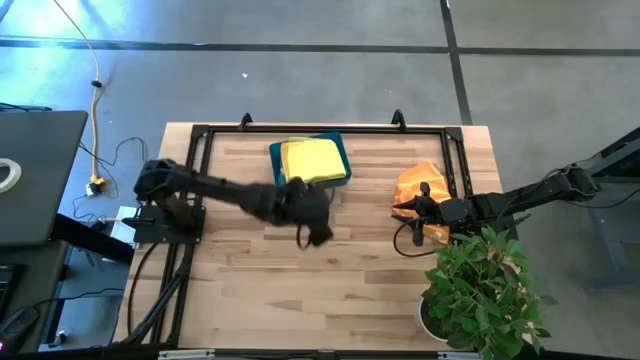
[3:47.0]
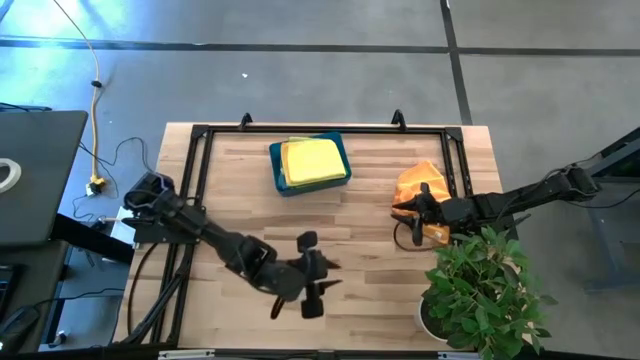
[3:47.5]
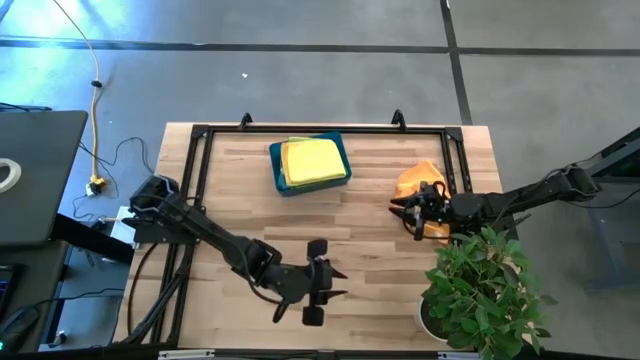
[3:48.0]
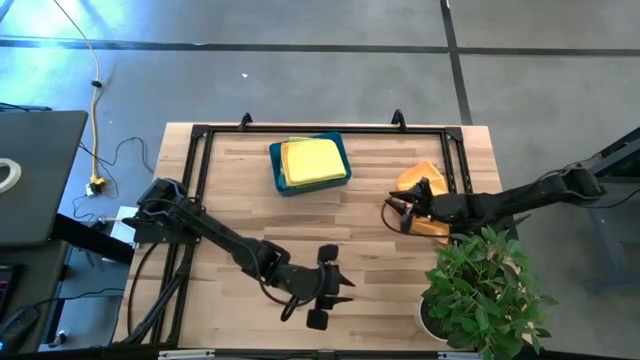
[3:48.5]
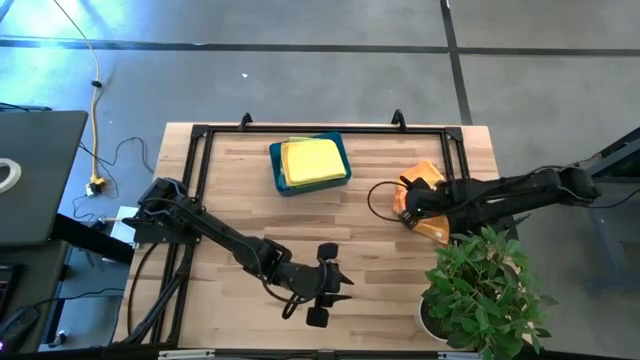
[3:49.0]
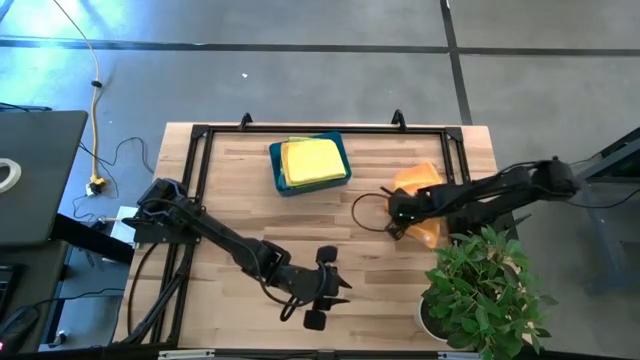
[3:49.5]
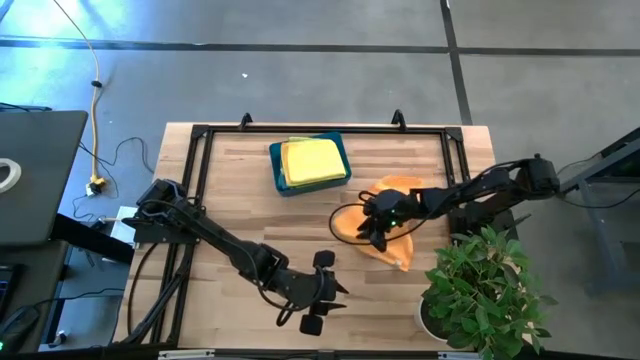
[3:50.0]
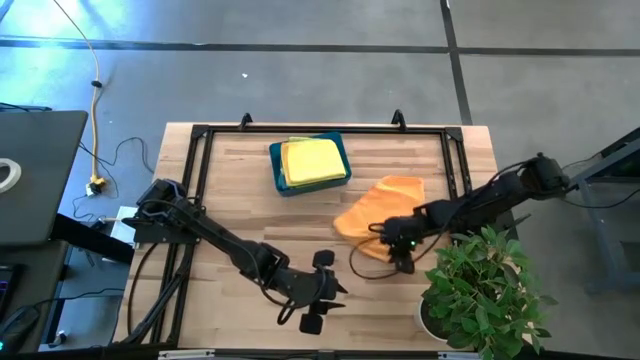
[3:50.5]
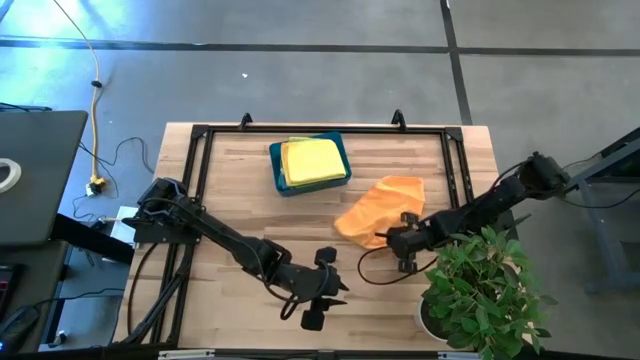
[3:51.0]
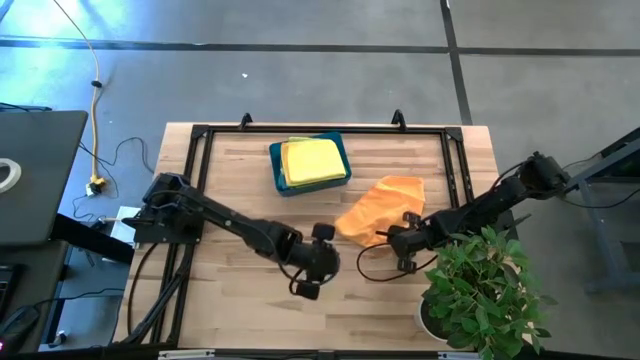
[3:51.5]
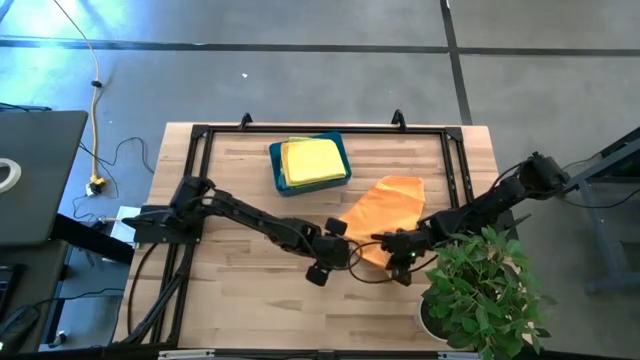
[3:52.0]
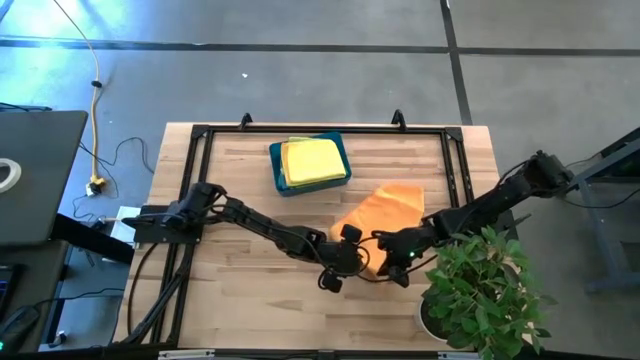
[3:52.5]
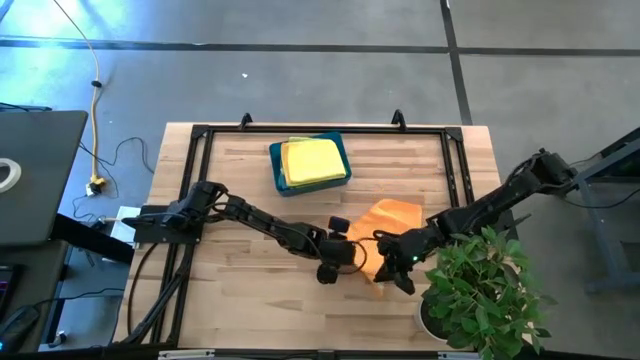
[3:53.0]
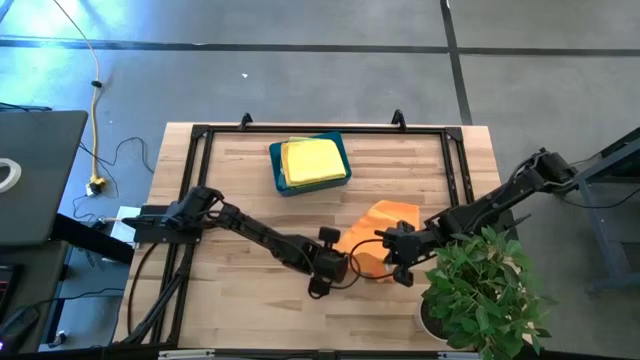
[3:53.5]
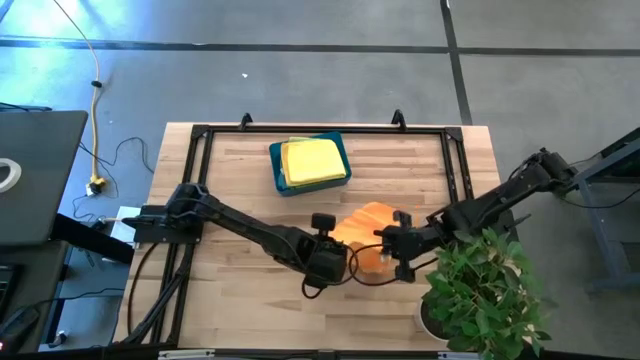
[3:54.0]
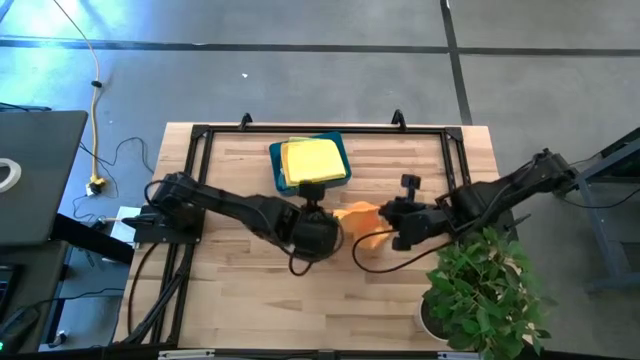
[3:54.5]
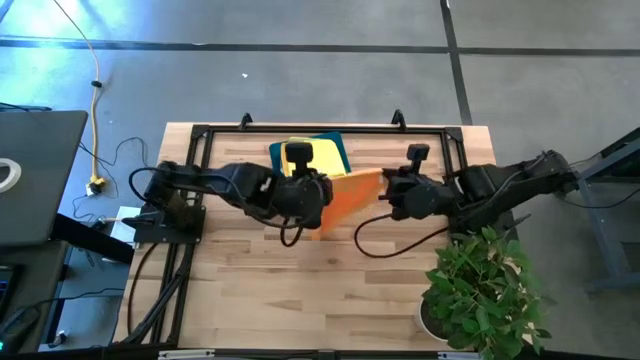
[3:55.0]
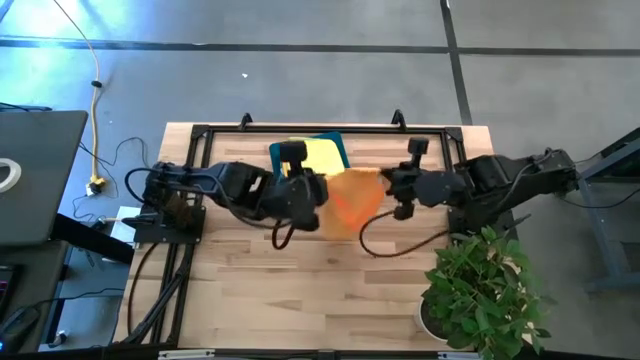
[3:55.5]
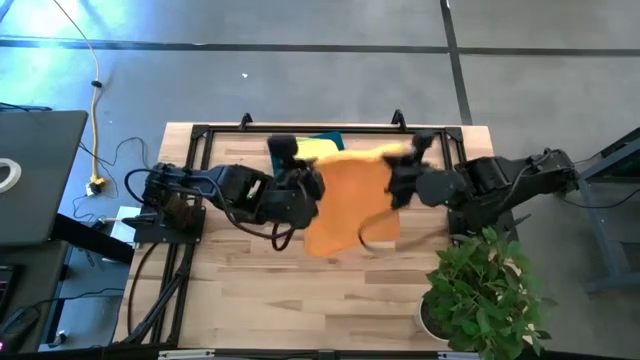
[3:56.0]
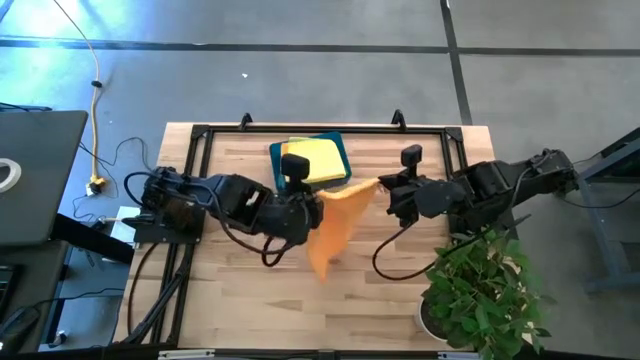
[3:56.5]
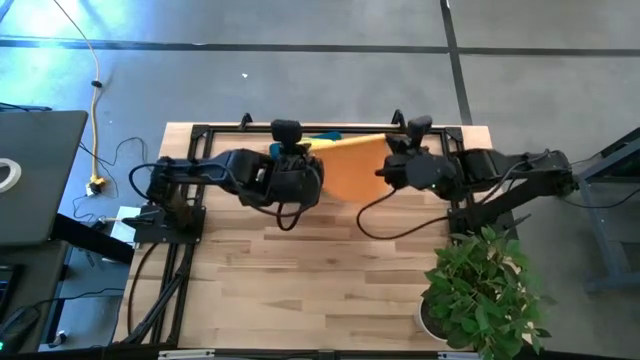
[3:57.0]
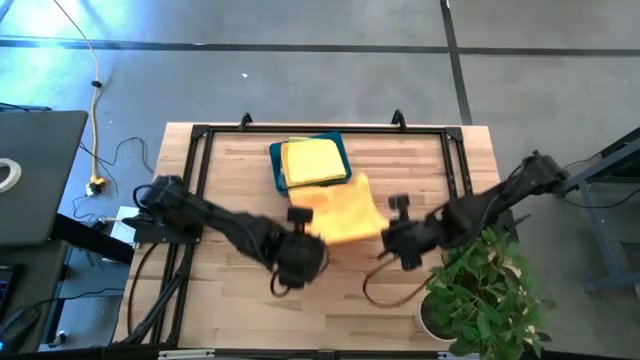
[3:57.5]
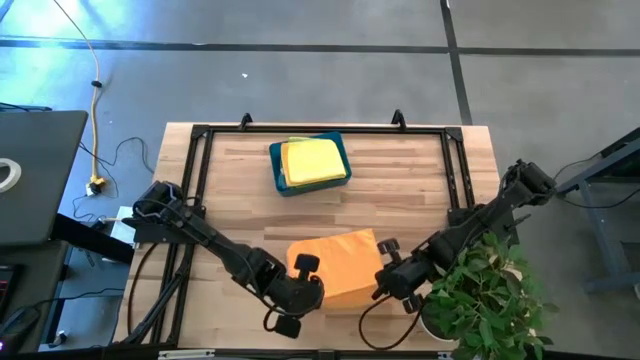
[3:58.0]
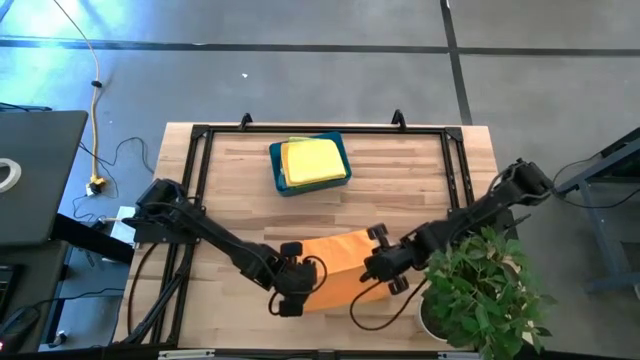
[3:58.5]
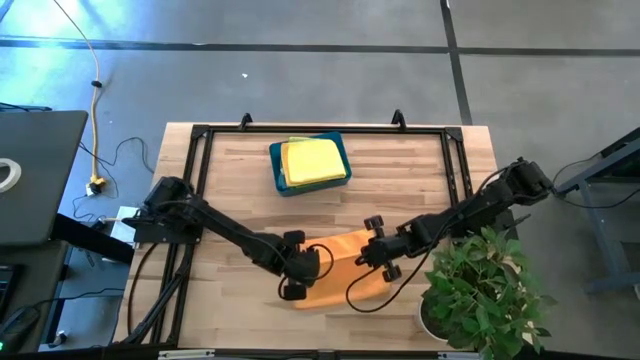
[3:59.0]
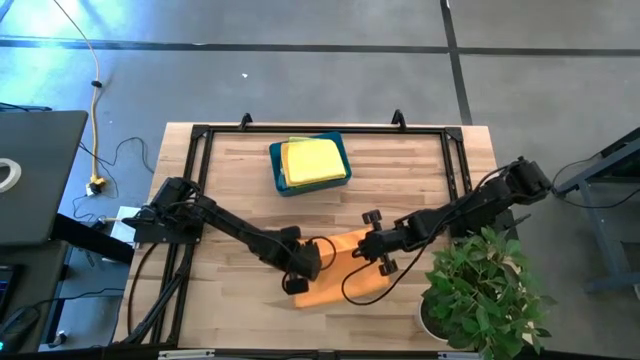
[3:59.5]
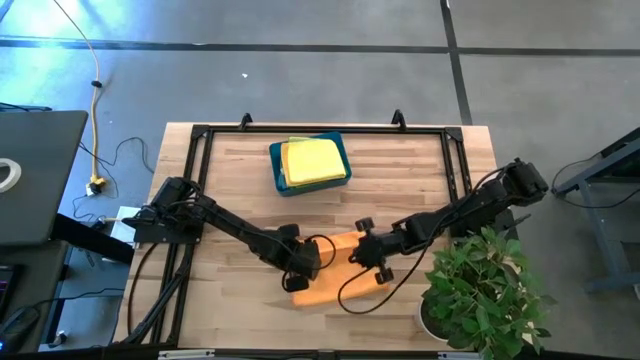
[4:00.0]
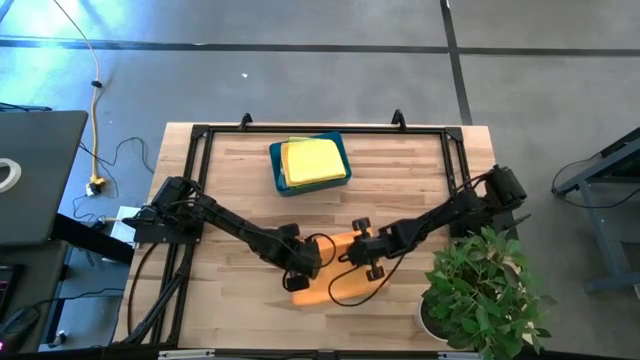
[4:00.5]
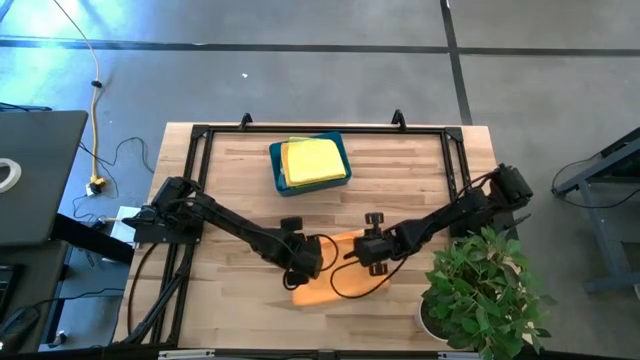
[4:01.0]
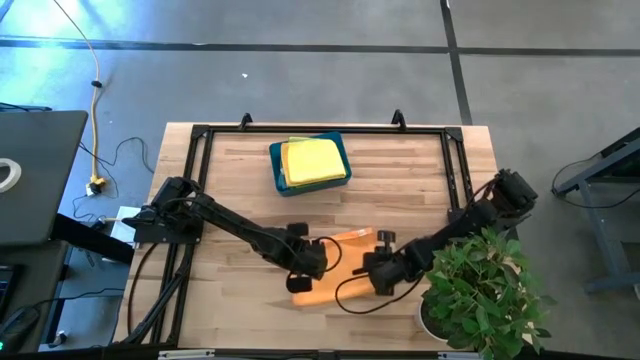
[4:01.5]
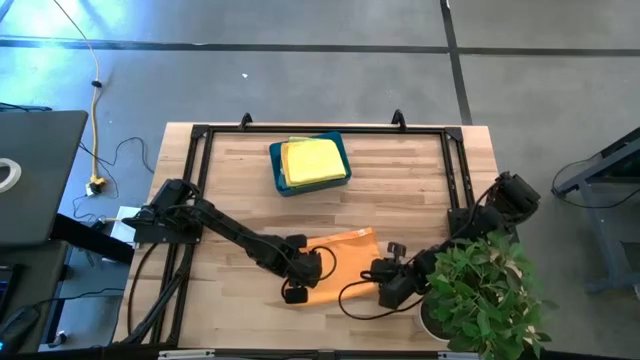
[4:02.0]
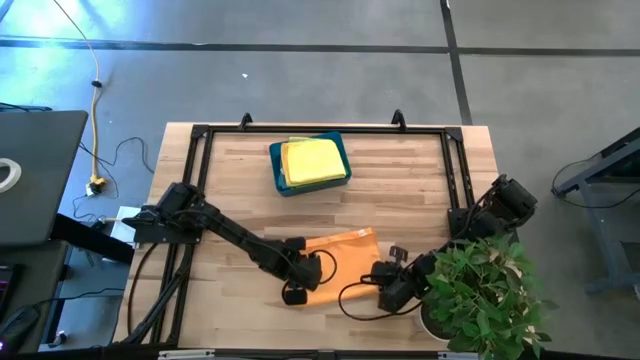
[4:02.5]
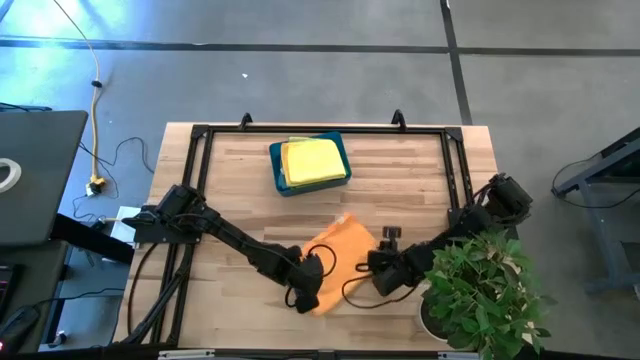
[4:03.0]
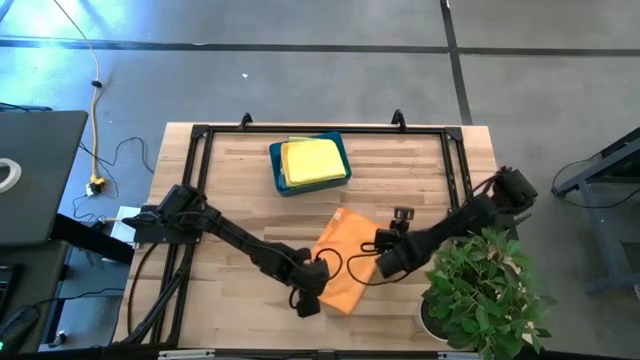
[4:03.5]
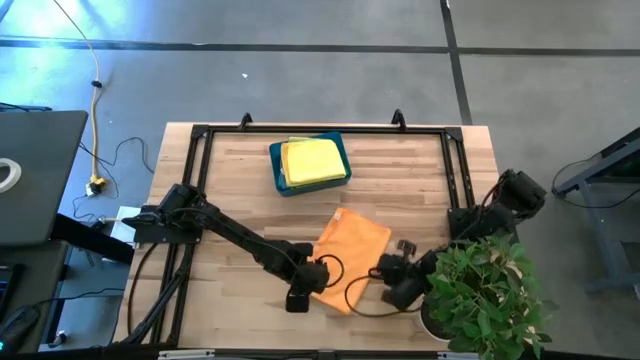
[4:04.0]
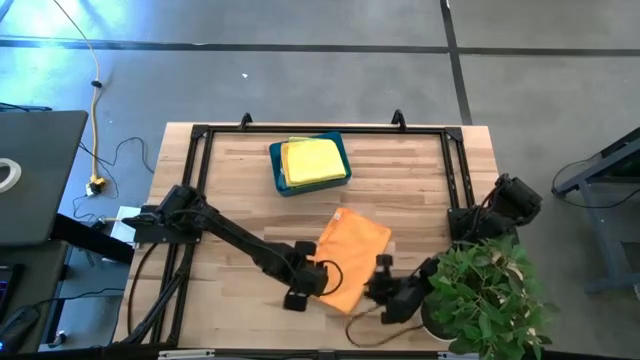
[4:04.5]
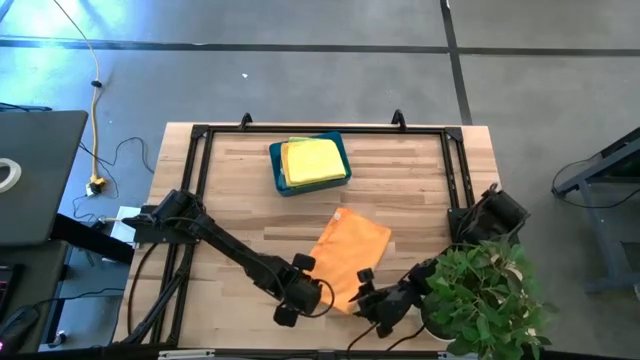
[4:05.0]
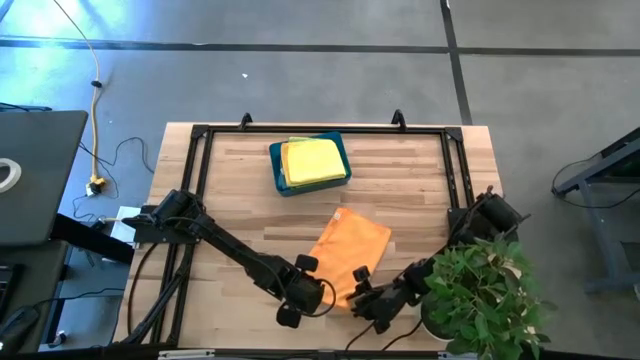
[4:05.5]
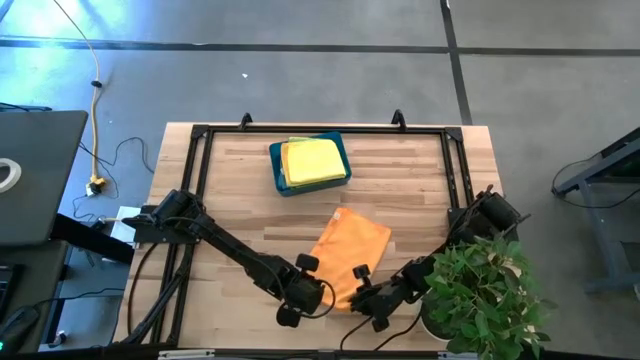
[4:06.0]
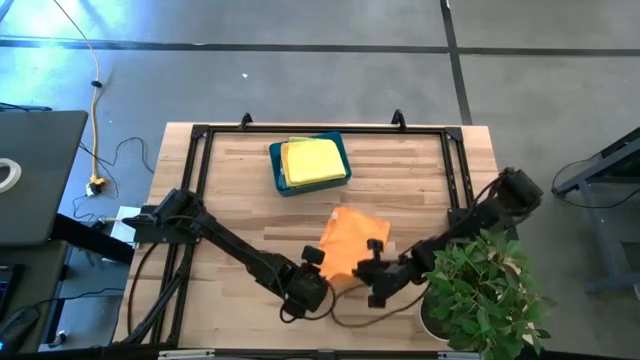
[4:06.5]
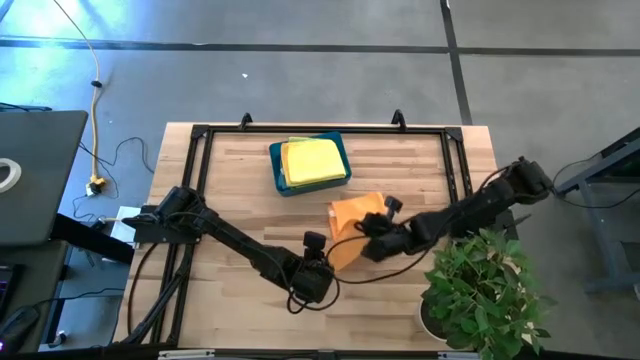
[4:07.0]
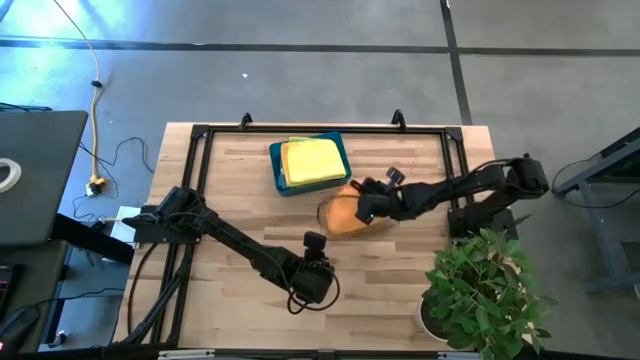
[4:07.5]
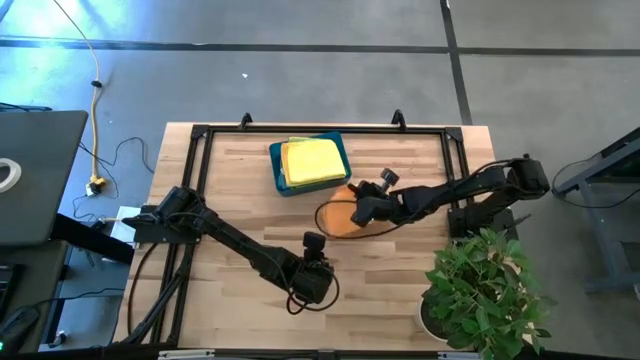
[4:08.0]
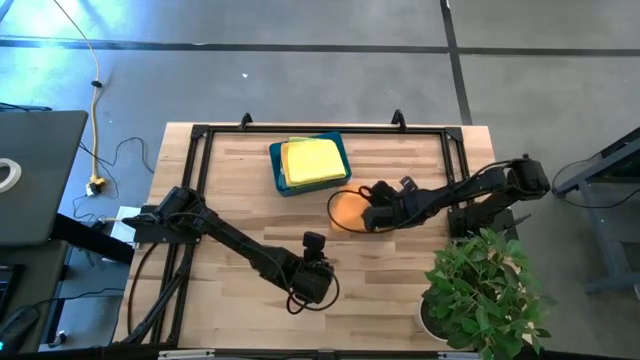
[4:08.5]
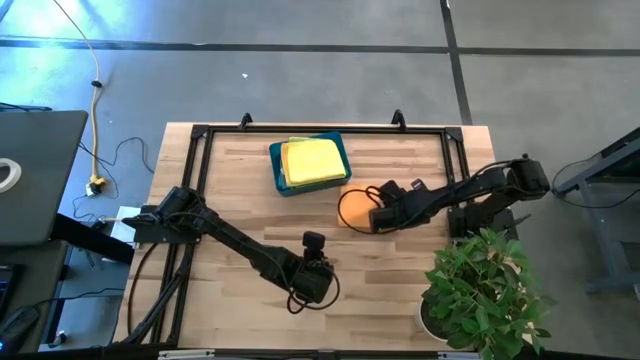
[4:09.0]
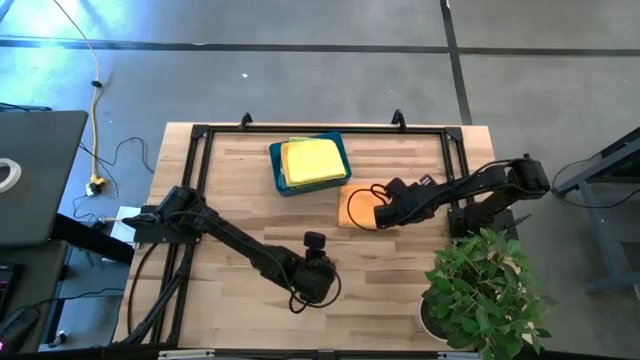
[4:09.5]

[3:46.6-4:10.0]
Task: Fold microfiber towels
Fold the orange microfiber cloth
